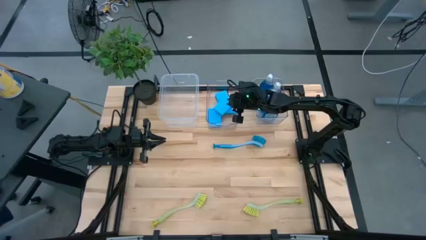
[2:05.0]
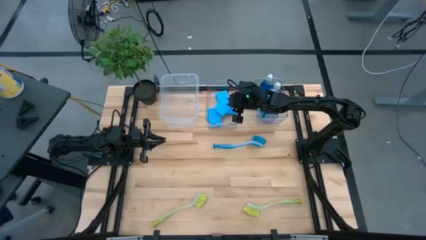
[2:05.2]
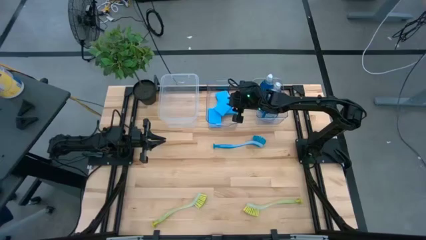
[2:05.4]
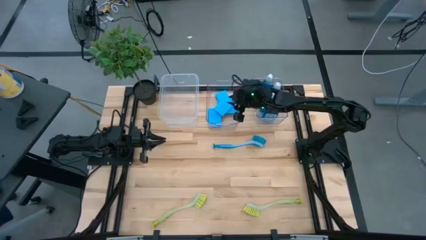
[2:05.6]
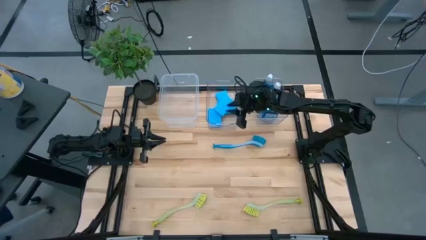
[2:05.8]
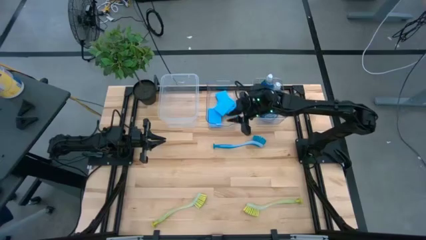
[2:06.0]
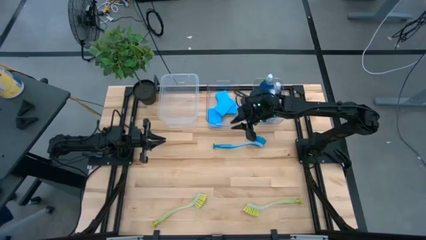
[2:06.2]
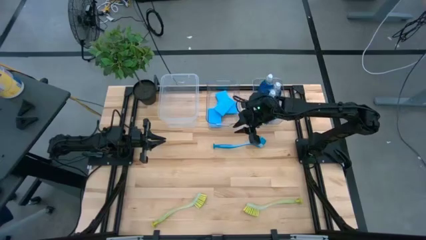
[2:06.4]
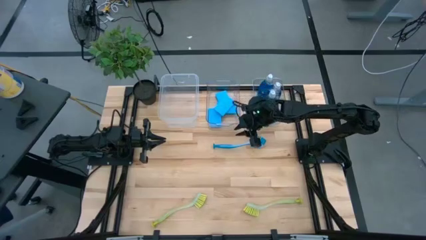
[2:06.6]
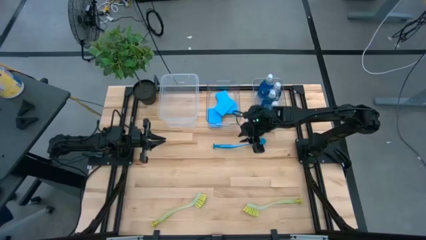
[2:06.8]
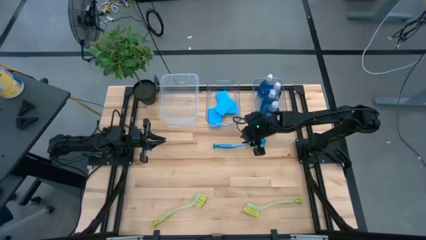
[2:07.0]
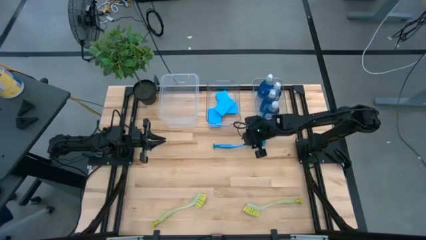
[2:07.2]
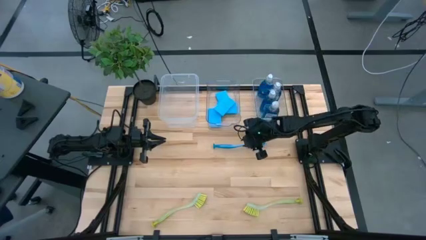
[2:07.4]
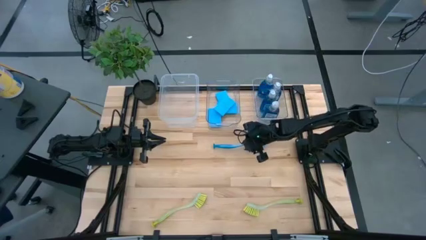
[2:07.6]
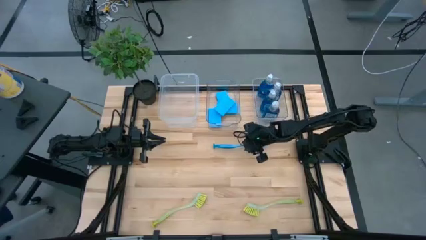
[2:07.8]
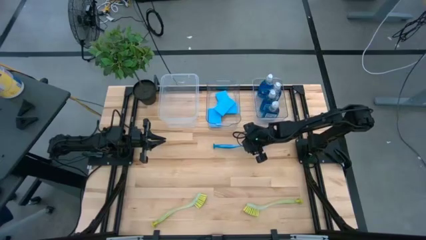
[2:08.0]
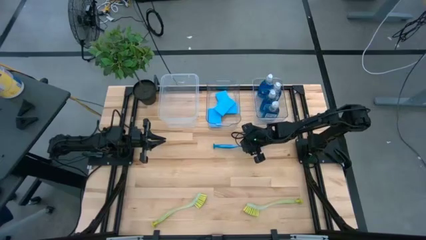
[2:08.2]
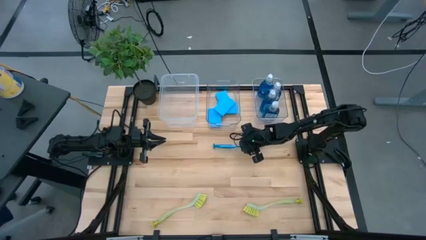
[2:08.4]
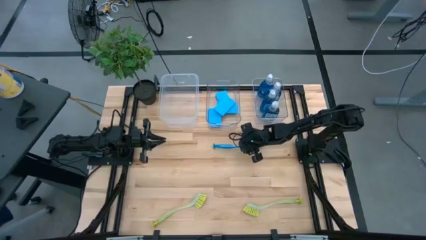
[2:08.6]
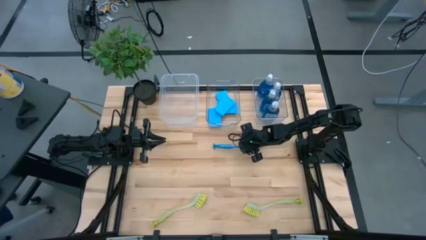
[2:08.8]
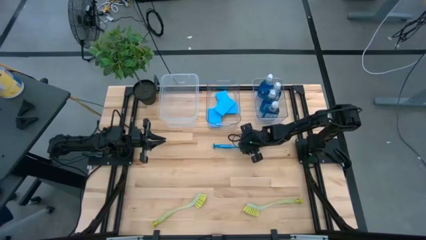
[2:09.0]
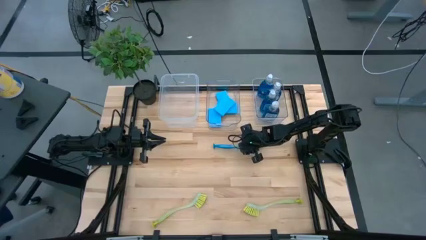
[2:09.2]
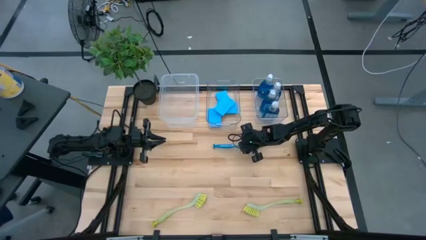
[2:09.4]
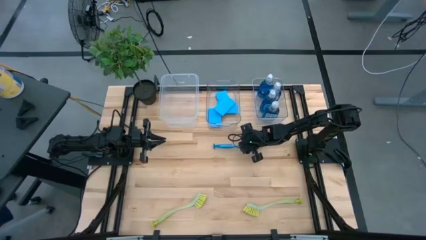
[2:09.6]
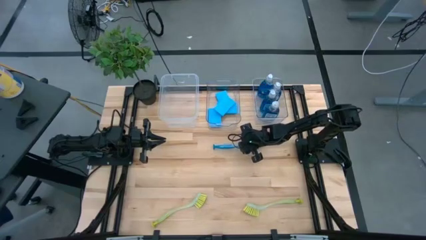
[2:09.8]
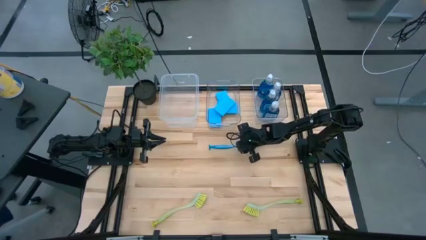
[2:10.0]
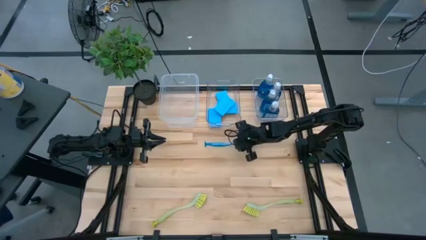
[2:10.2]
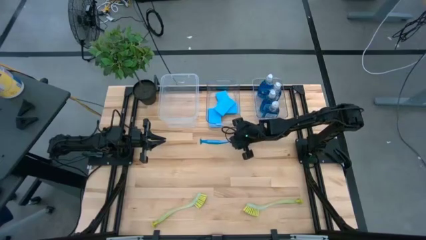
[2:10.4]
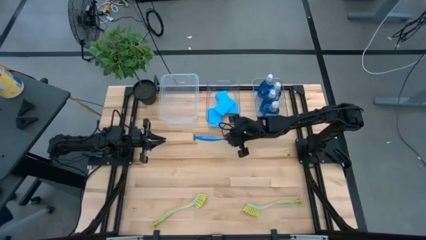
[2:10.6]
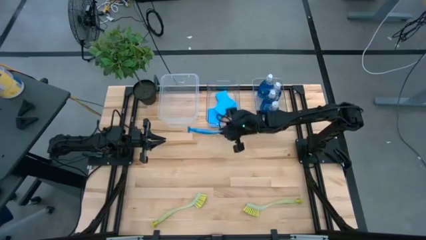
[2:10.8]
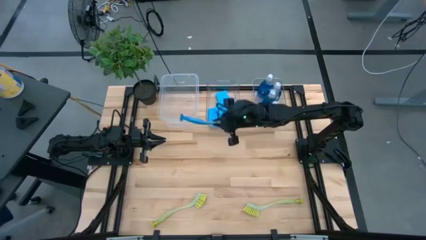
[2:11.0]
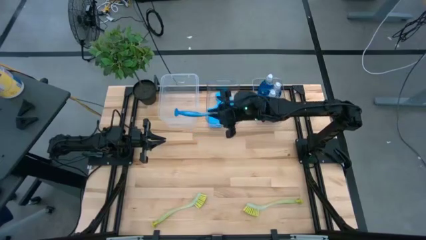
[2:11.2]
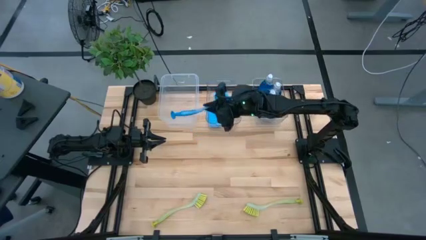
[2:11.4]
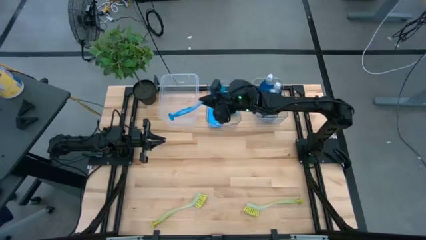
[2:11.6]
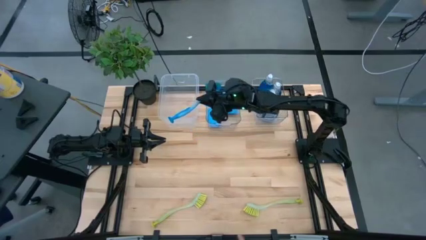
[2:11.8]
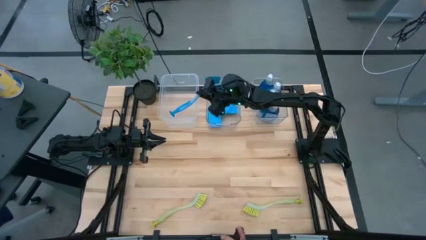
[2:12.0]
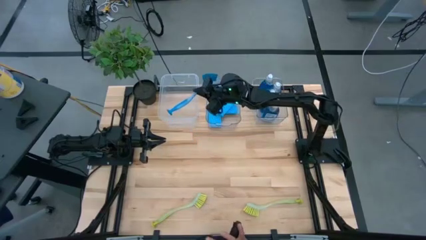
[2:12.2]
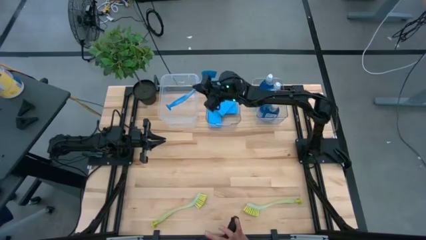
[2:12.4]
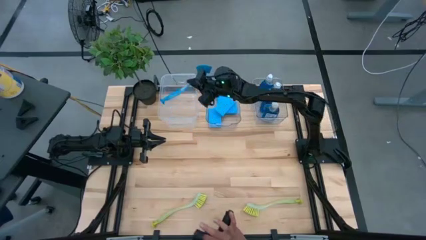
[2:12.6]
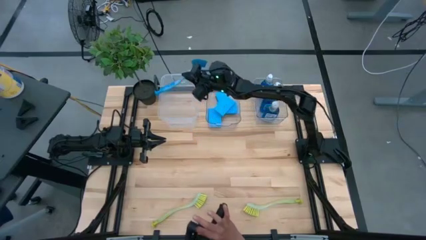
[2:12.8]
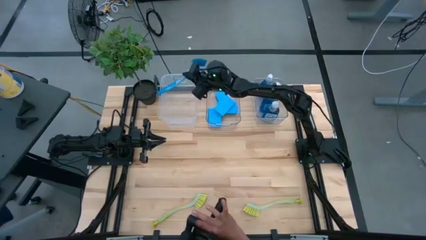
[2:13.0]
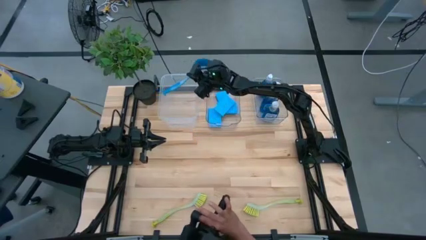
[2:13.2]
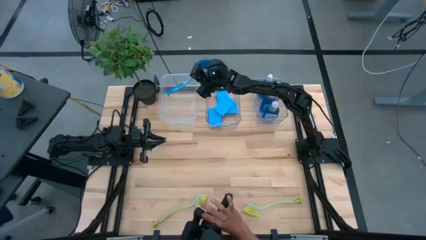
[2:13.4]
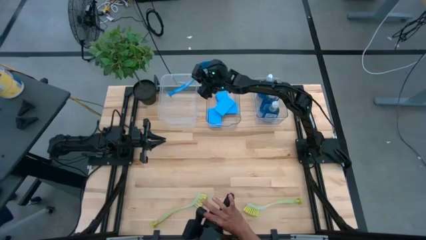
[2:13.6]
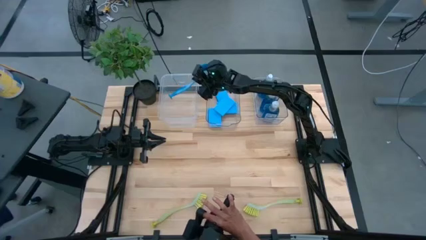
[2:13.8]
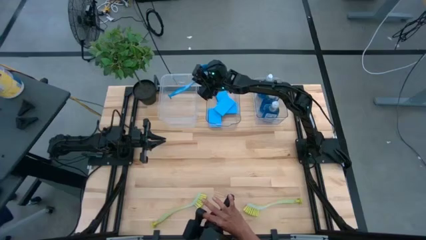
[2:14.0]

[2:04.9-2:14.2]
Task: Pick & Place Kitchen Sink Supplies
Put the blue cleaning brush into the left transparent bin

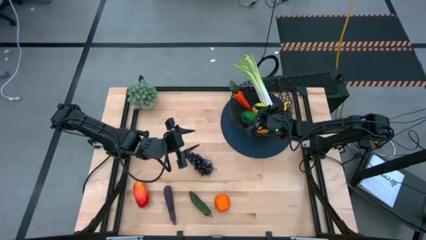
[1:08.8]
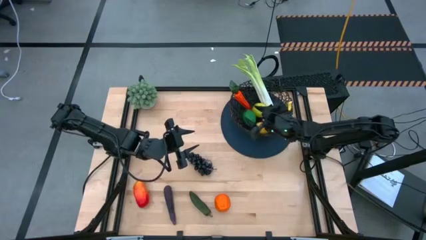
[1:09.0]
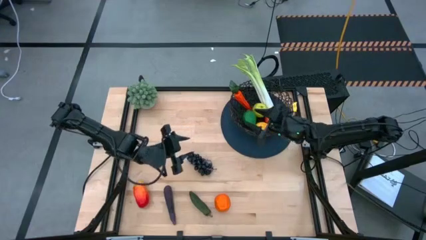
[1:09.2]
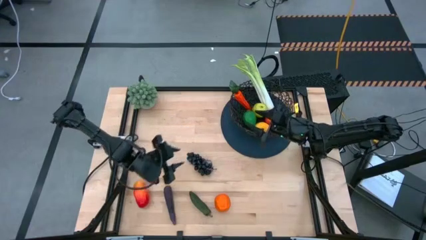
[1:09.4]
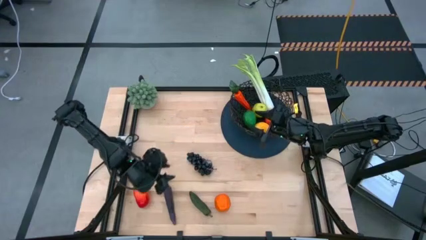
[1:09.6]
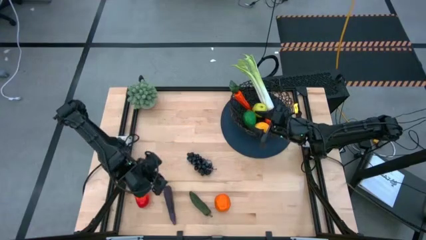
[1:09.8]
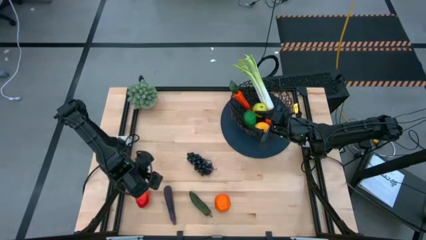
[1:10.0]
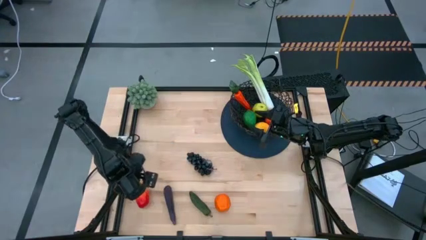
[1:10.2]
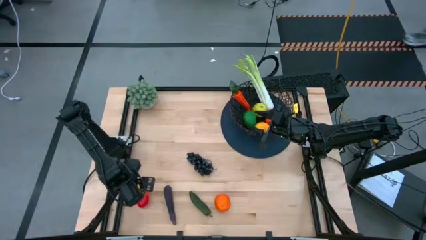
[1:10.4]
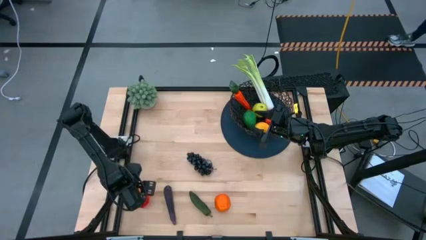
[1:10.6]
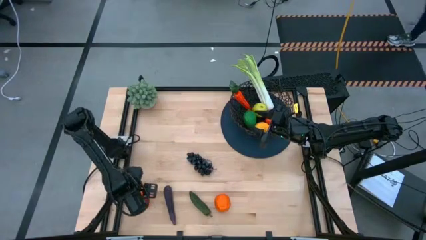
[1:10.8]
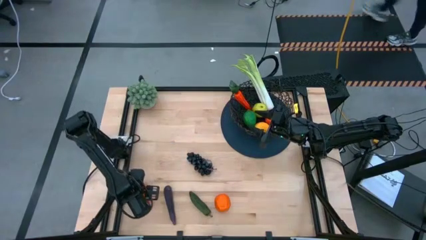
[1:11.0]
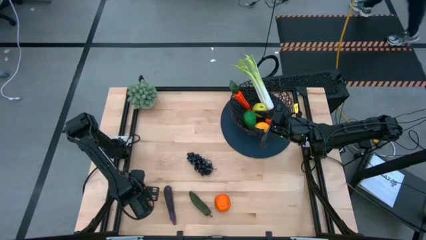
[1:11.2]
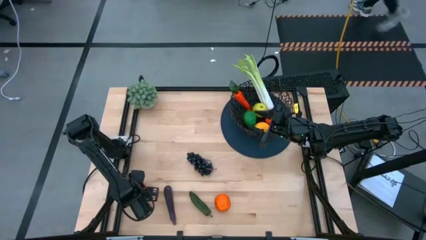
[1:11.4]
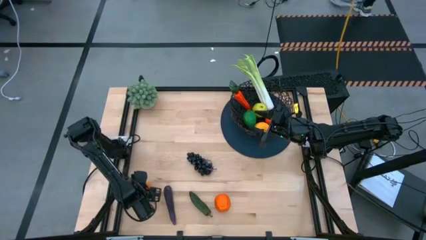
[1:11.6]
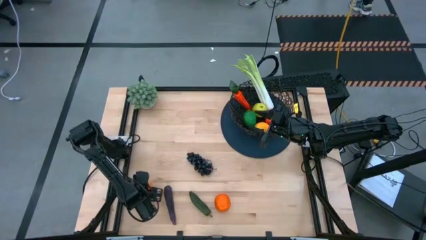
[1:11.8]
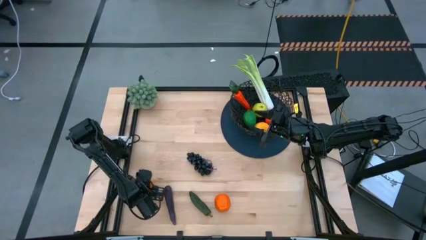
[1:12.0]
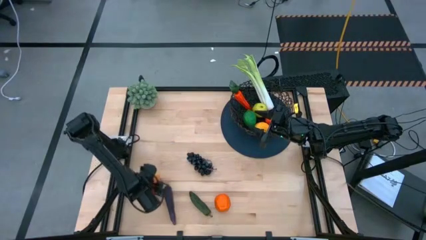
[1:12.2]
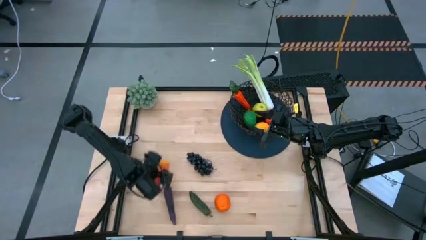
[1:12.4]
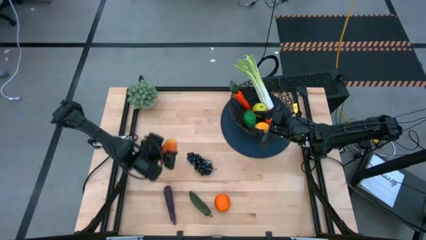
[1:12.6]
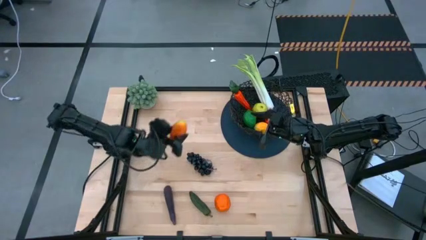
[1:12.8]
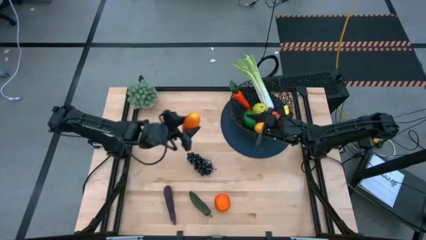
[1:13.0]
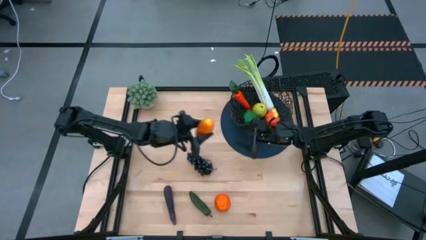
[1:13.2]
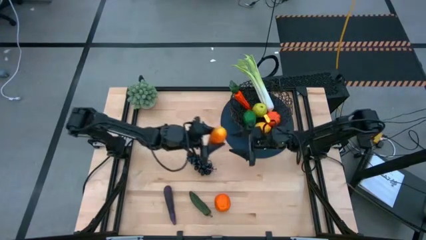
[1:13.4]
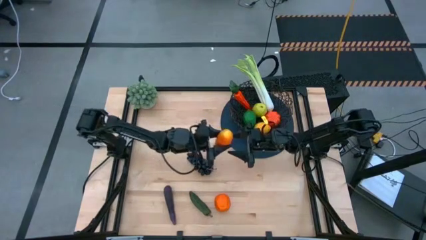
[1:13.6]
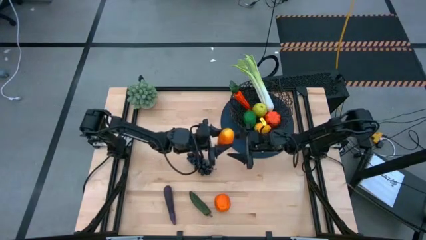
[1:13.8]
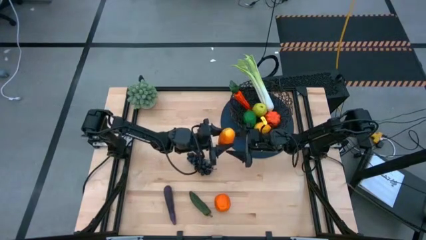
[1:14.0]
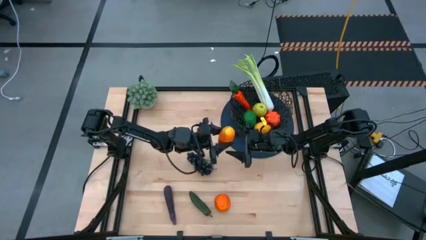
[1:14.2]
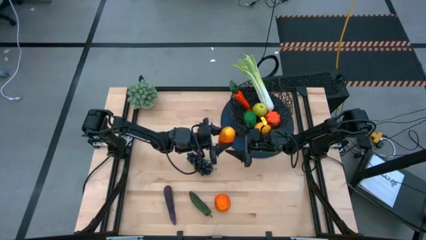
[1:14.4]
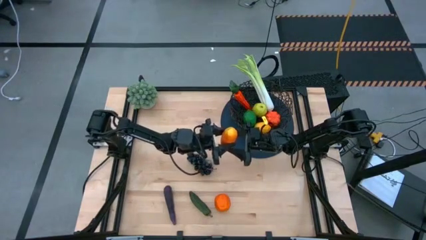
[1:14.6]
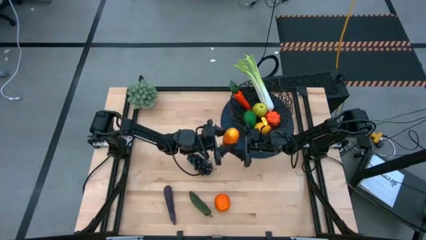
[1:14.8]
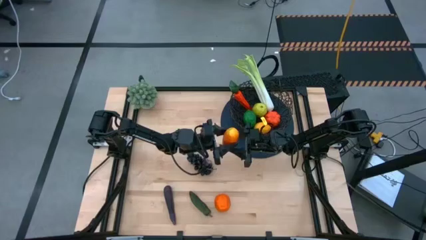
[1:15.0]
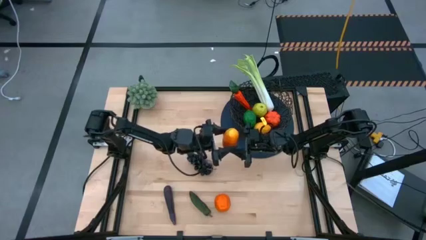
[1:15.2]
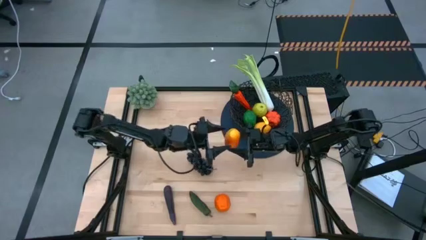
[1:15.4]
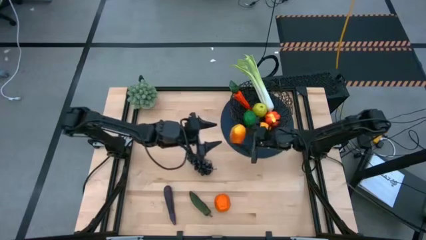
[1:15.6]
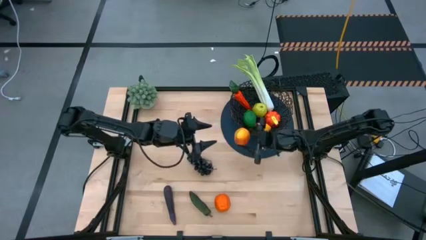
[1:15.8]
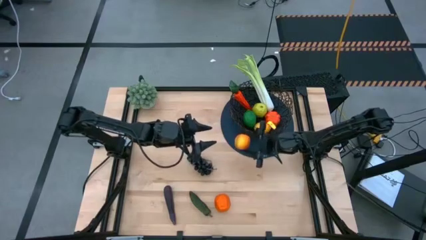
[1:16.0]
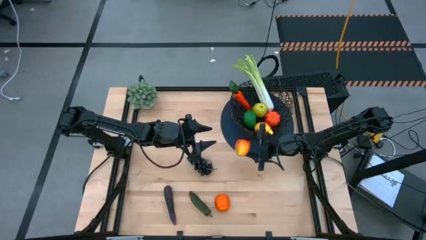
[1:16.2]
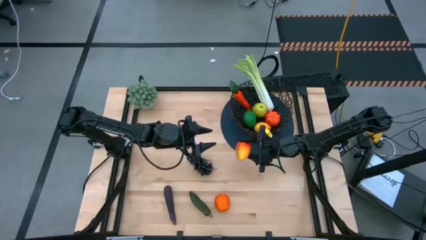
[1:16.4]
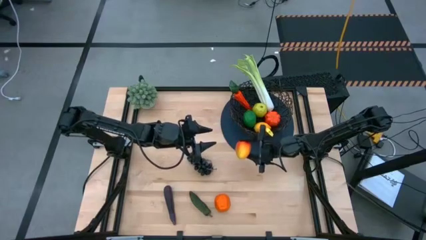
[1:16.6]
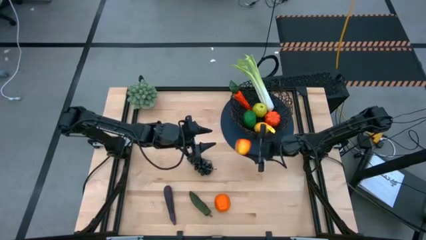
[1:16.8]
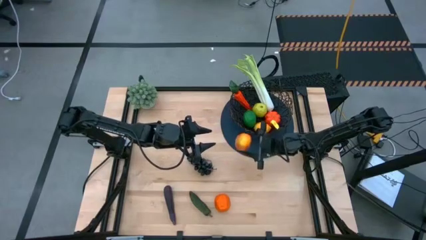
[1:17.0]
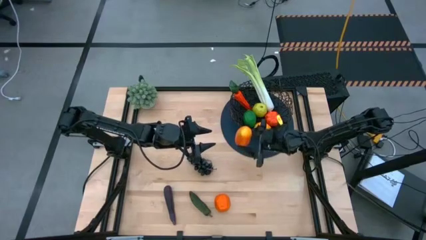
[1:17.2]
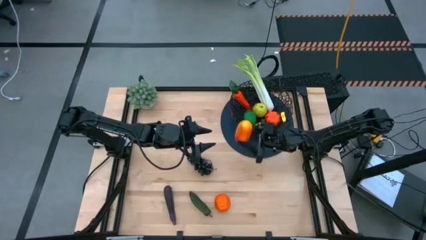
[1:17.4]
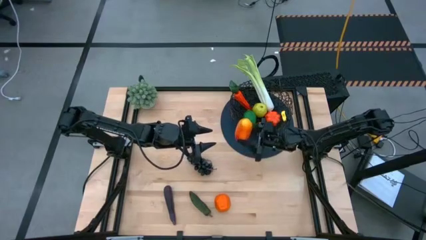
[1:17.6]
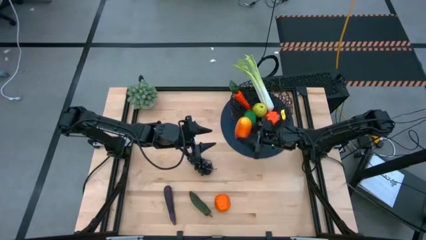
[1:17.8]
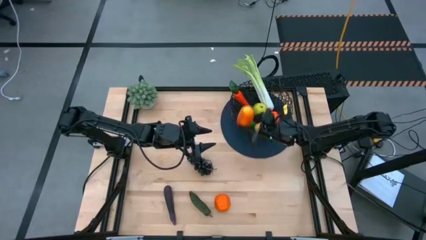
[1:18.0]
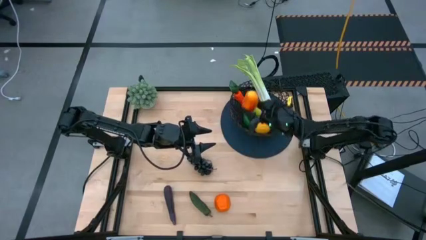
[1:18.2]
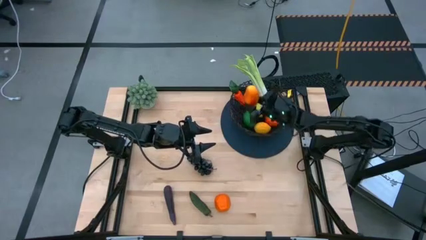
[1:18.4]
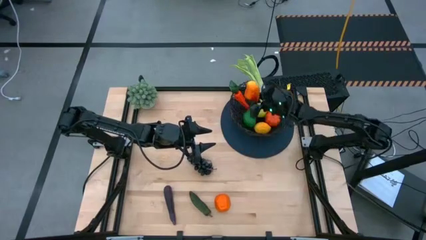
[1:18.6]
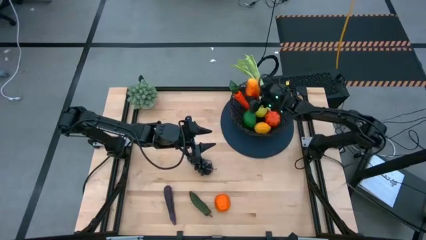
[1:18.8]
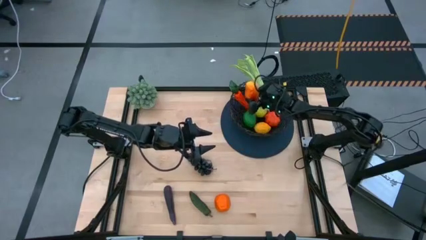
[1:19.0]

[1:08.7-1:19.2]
Task: Build produce basket
Put the orange mango into the black wire basket
